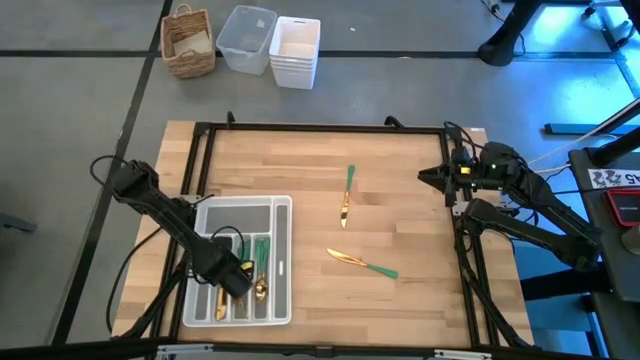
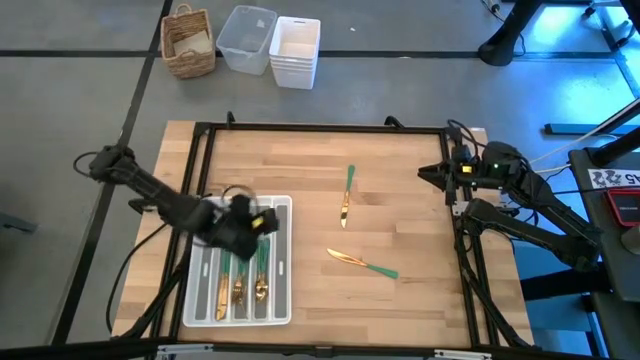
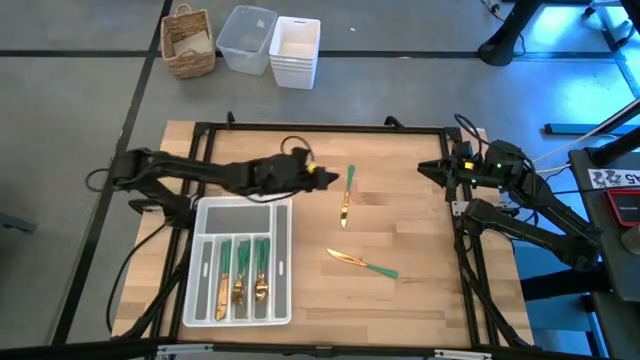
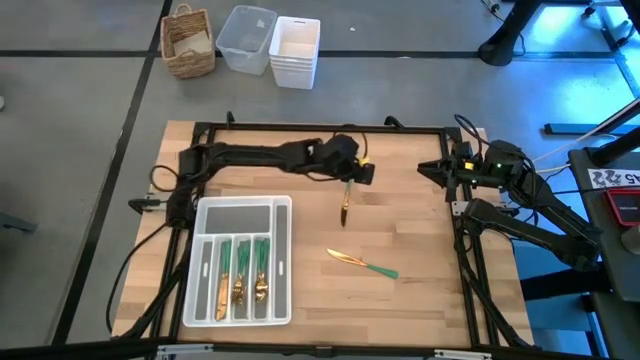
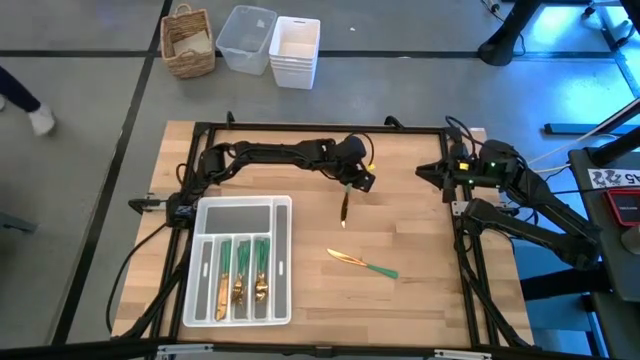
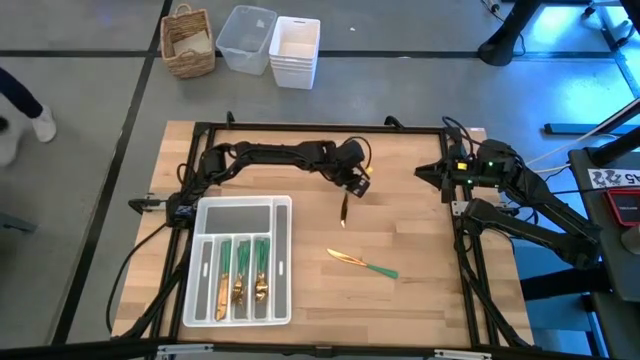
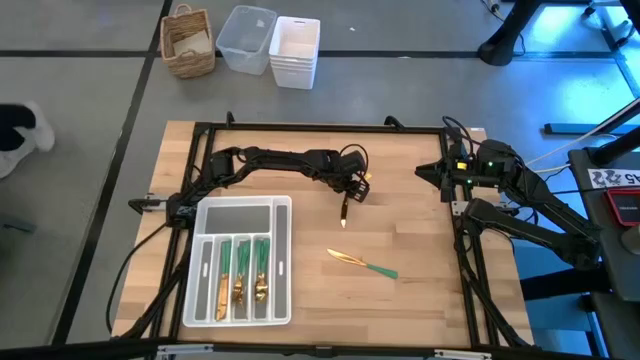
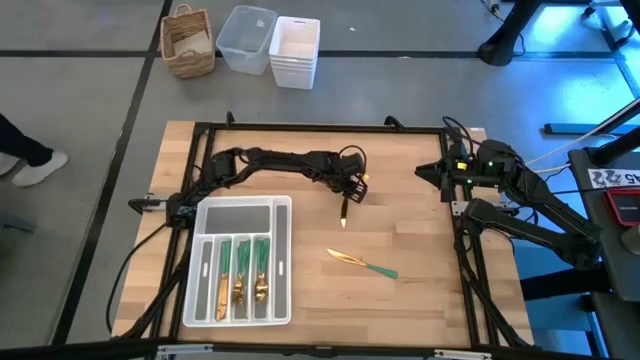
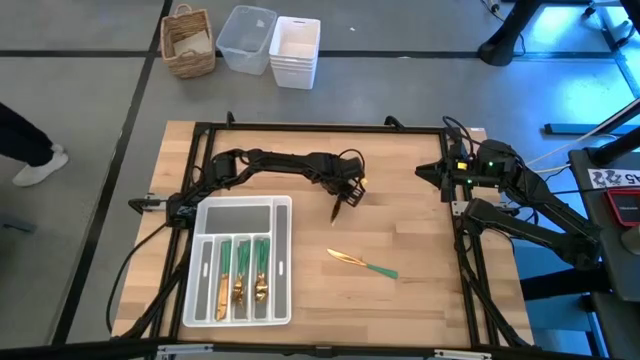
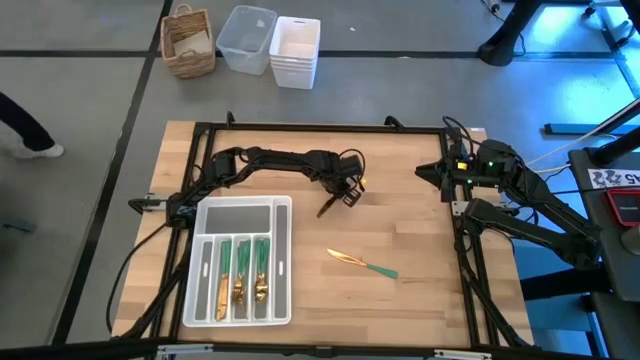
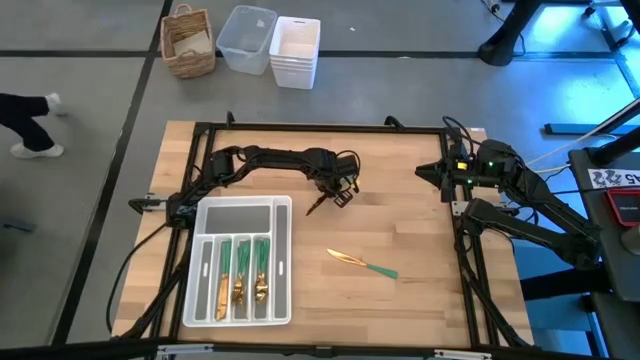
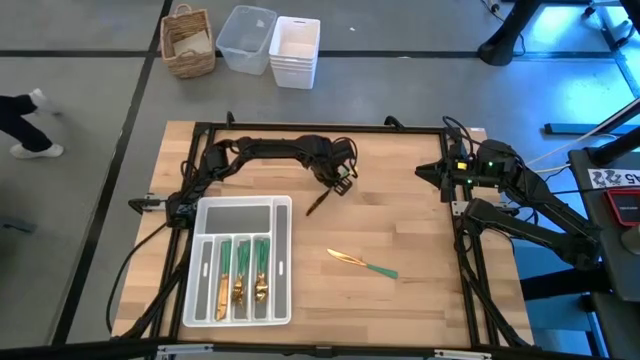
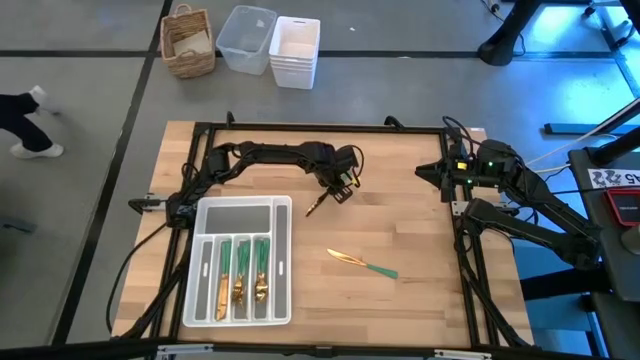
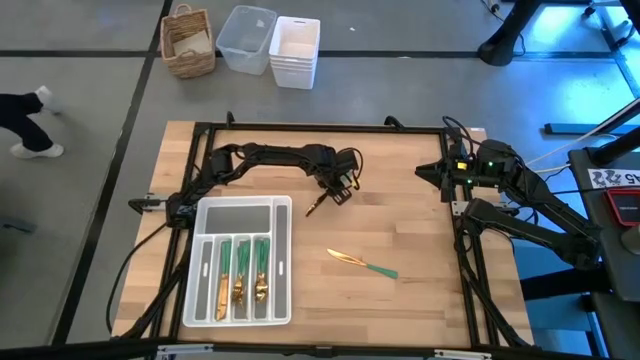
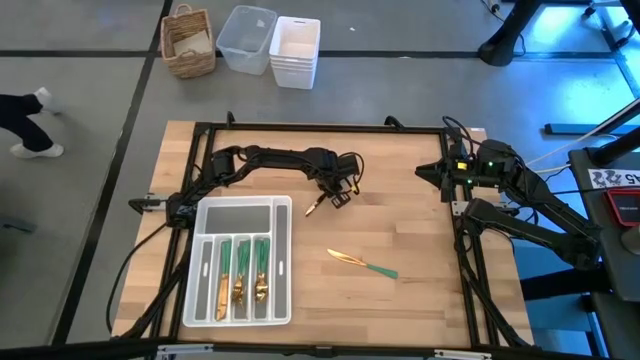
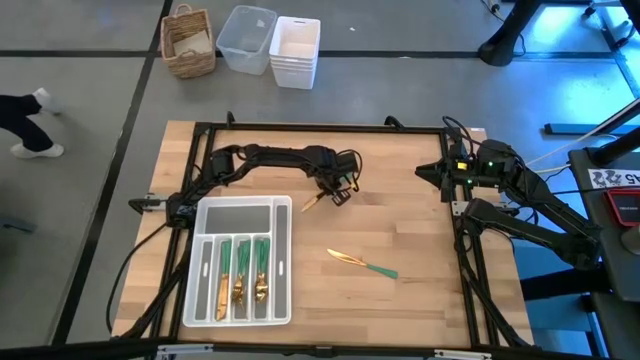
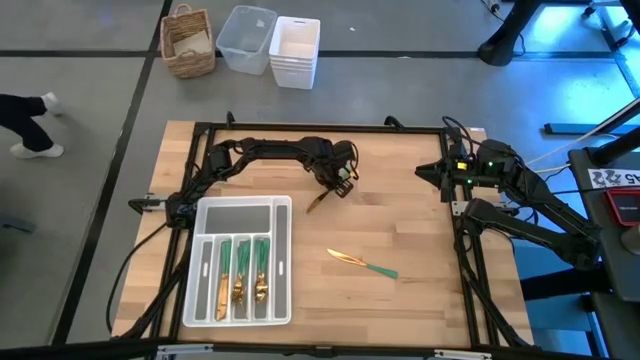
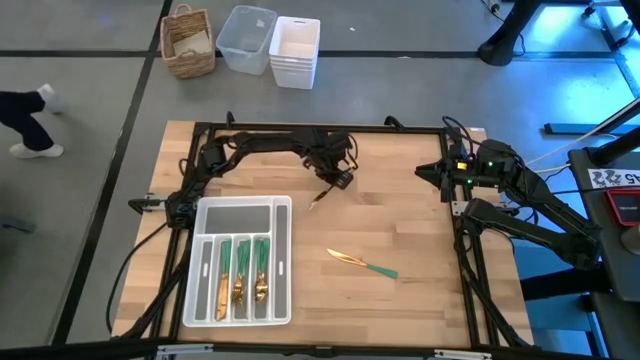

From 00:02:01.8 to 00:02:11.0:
Task: Sort silverware
Put the green knife on the silverware tray

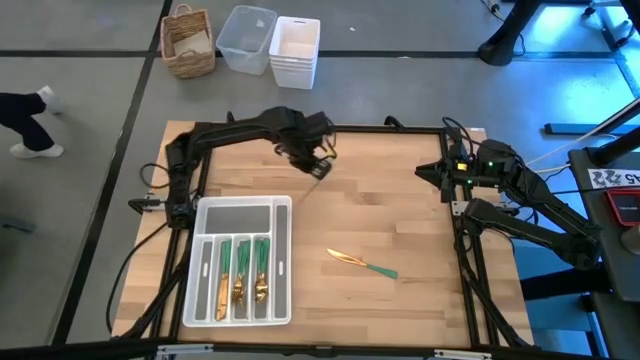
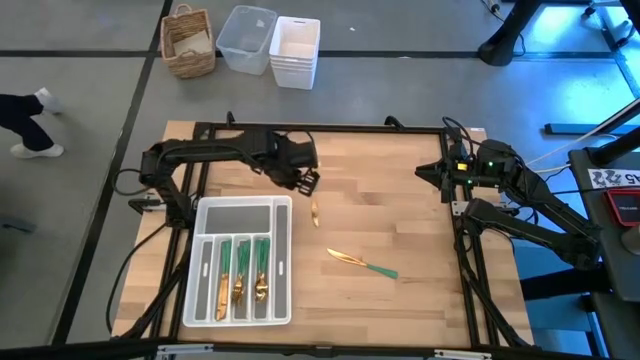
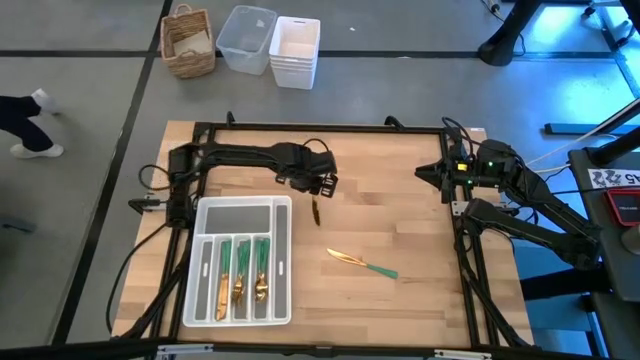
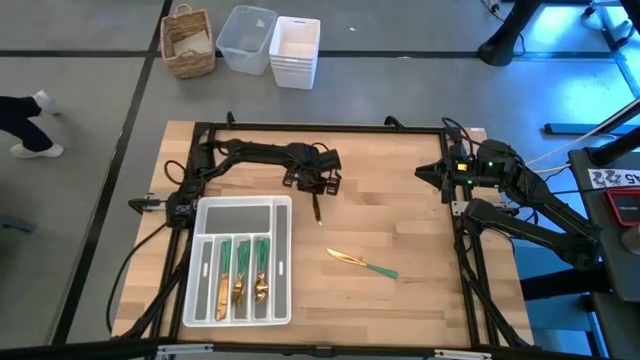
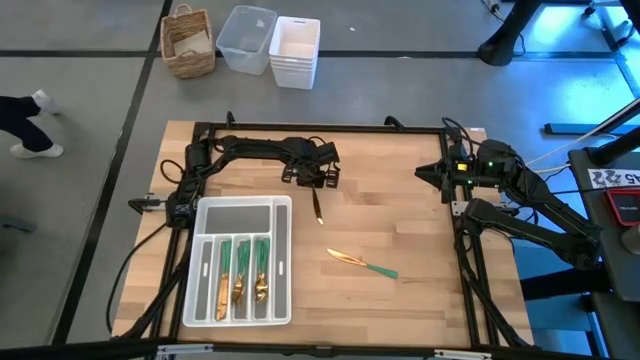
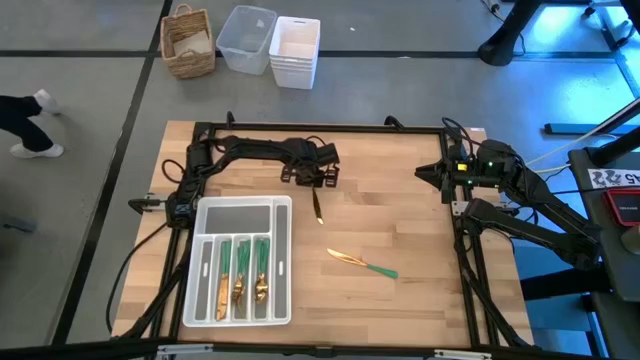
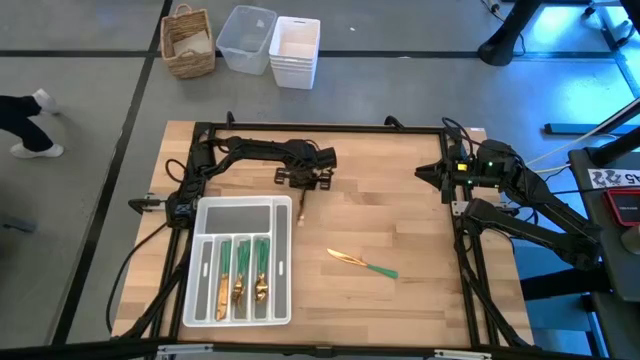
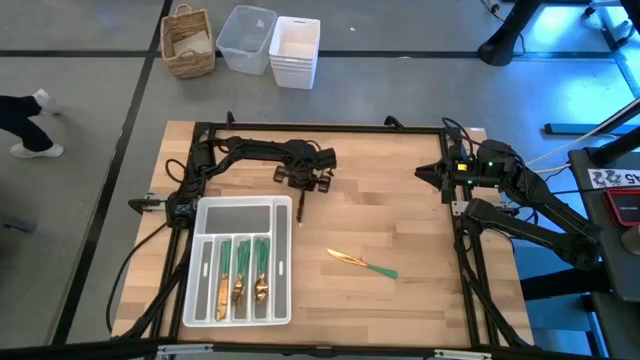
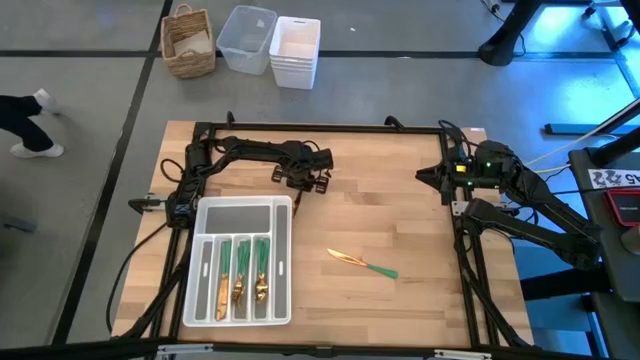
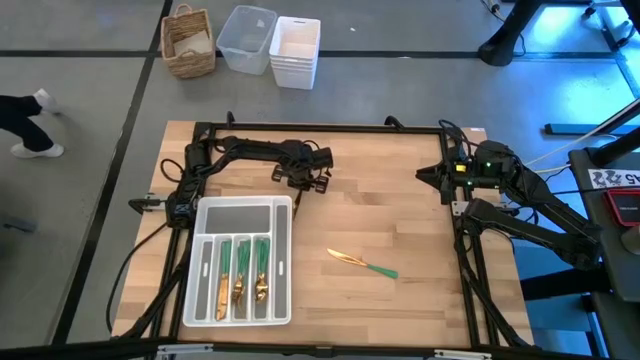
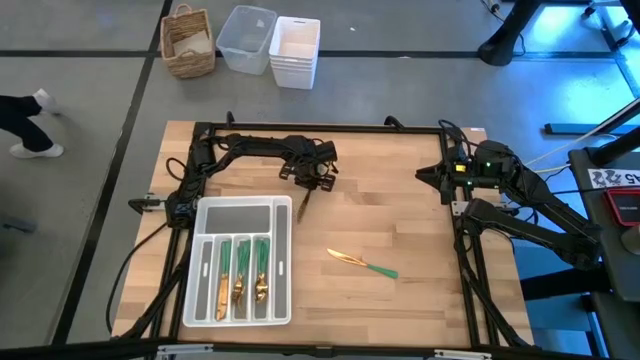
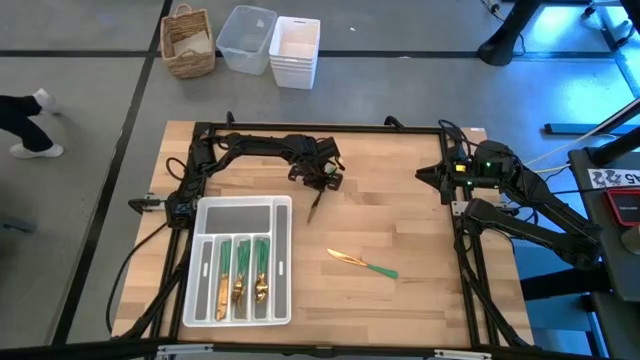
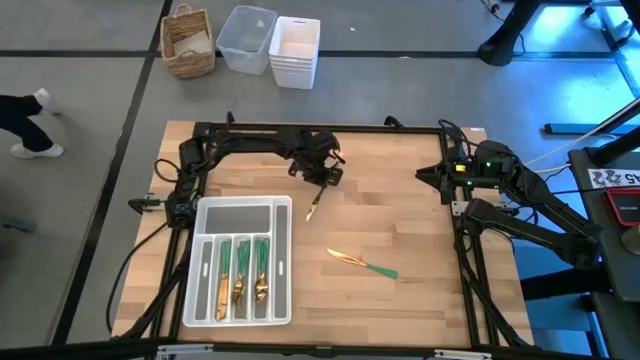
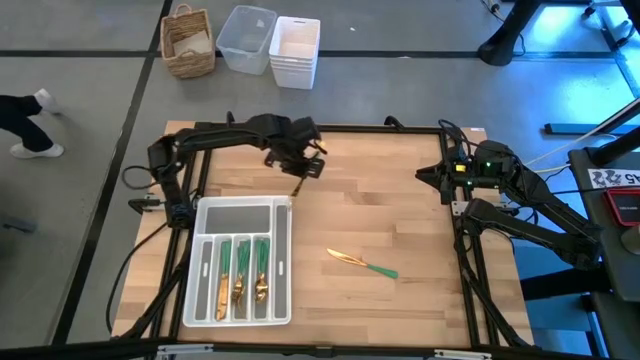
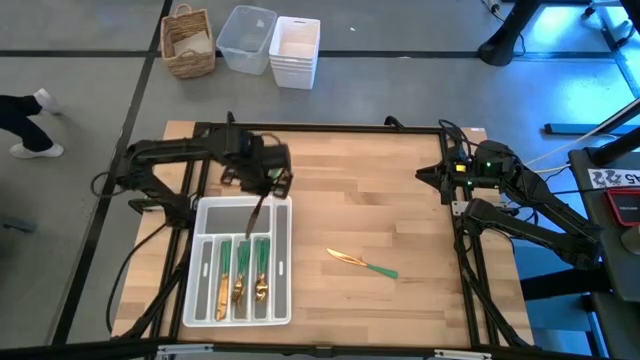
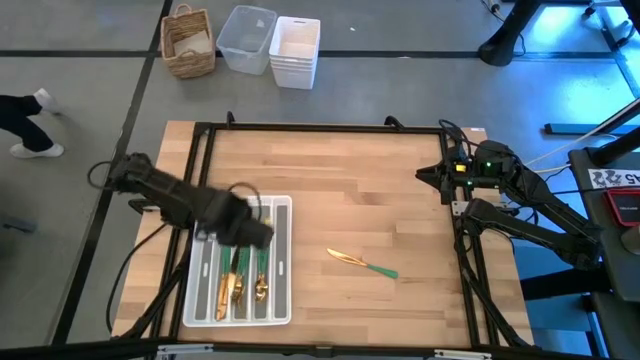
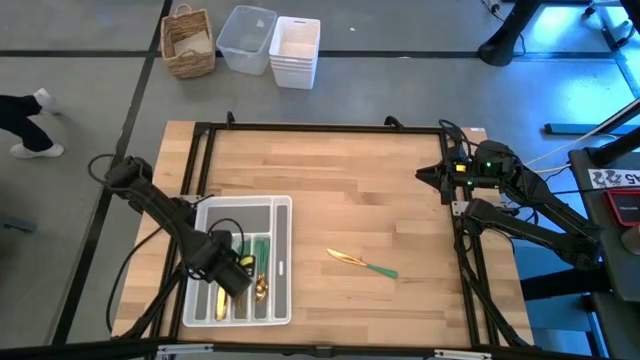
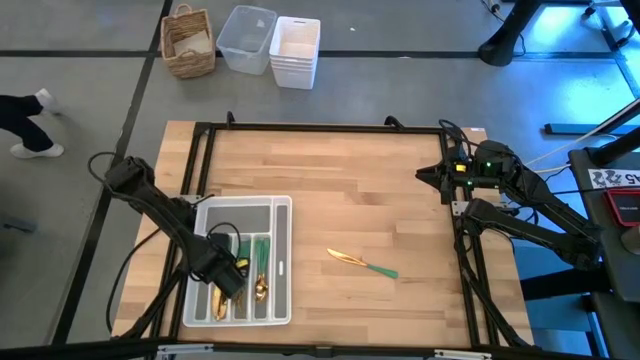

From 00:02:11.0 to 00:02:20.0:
Put the green knife on the silverware tray
